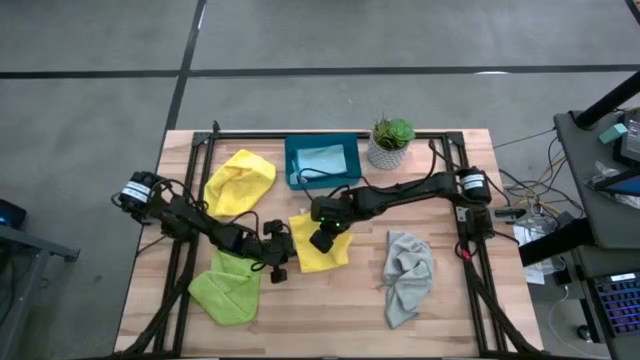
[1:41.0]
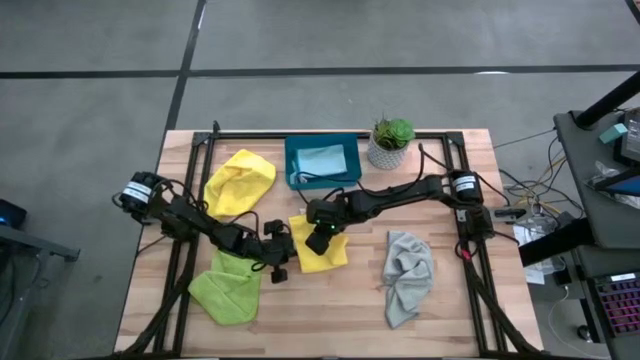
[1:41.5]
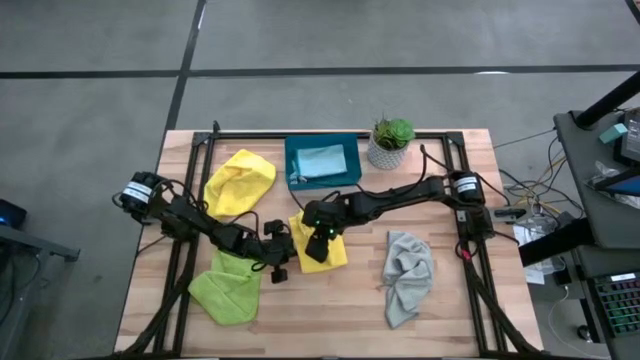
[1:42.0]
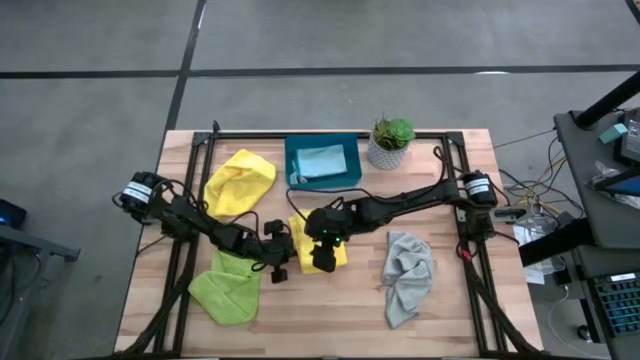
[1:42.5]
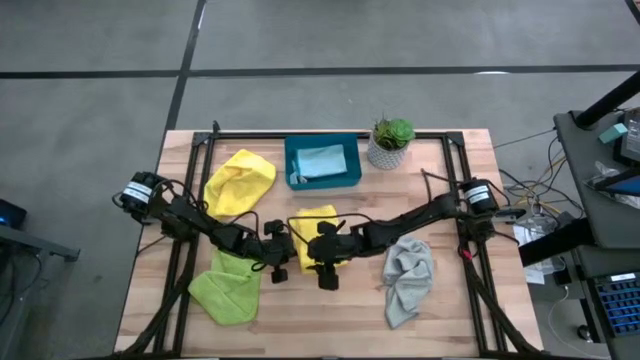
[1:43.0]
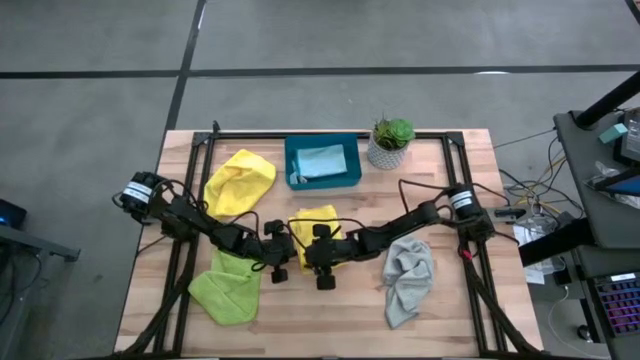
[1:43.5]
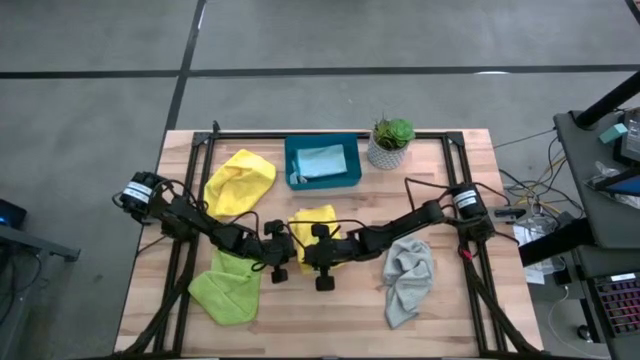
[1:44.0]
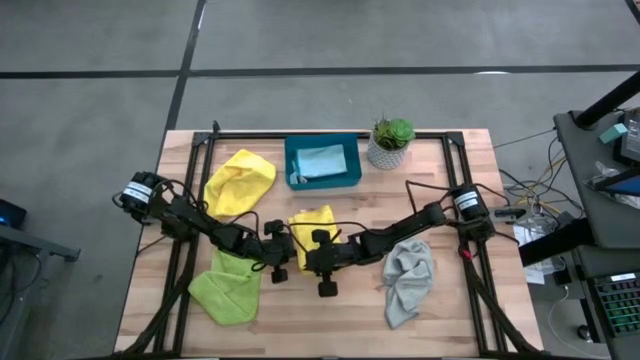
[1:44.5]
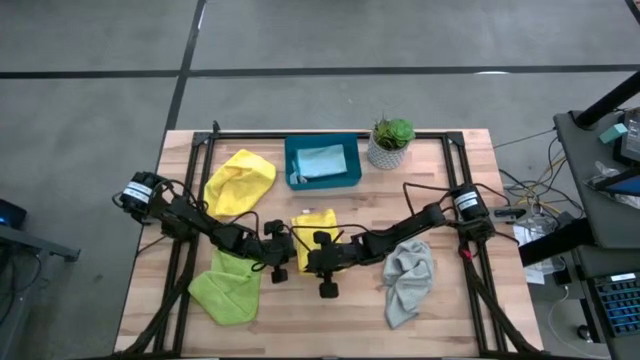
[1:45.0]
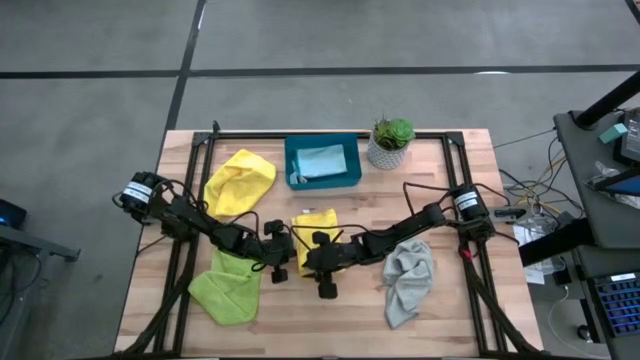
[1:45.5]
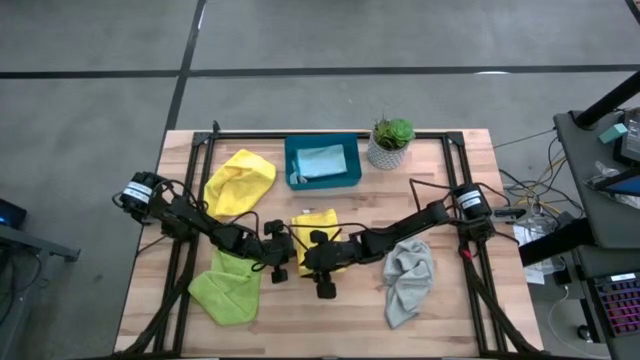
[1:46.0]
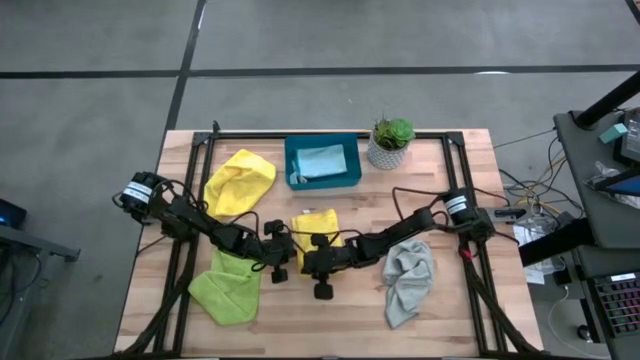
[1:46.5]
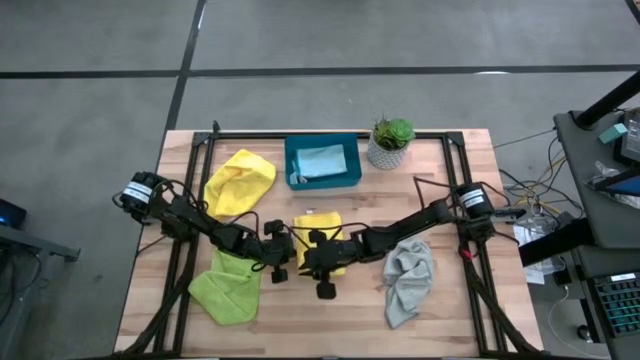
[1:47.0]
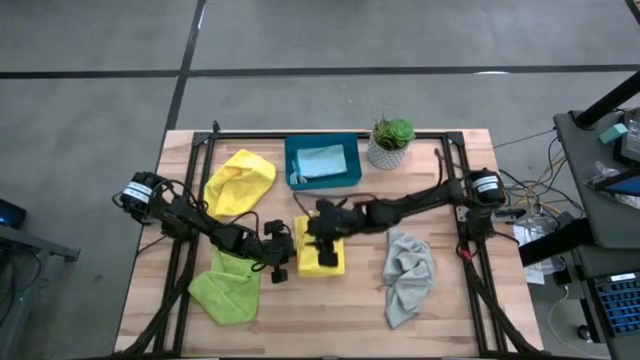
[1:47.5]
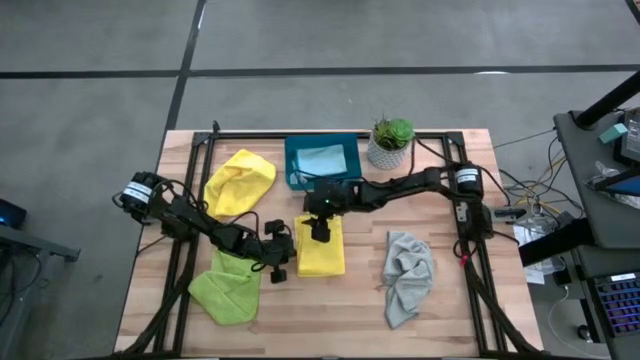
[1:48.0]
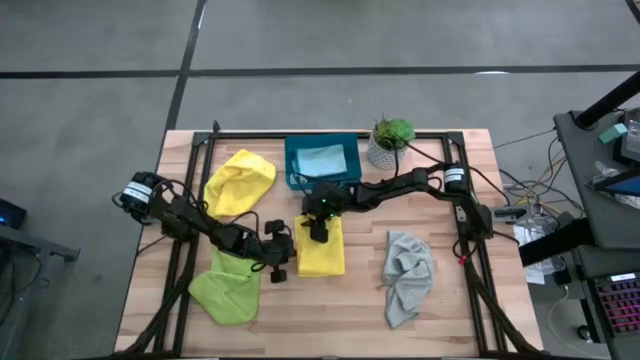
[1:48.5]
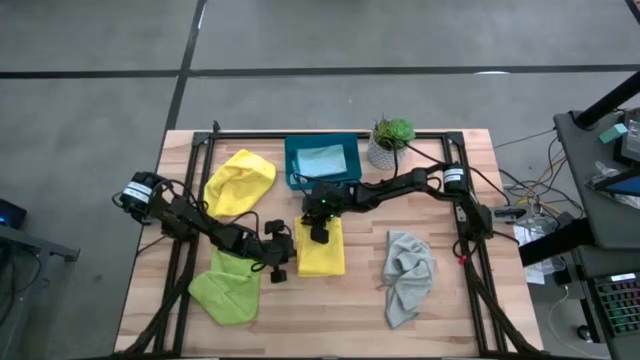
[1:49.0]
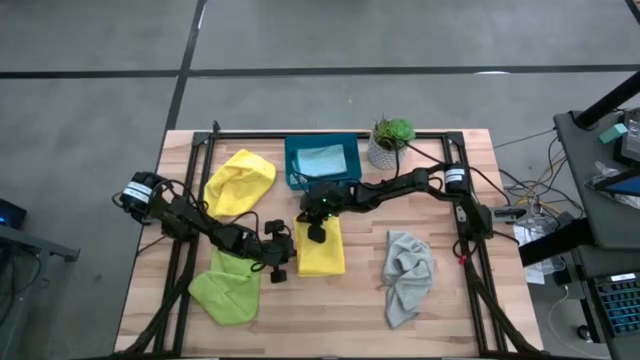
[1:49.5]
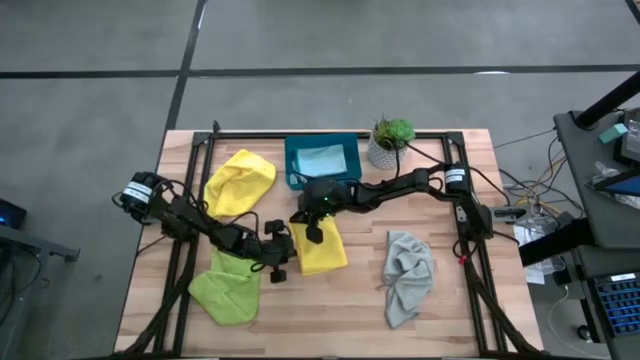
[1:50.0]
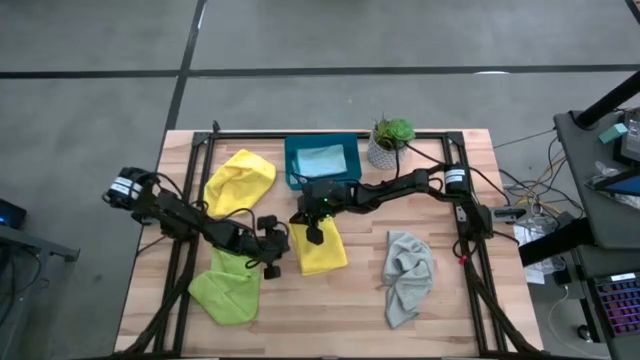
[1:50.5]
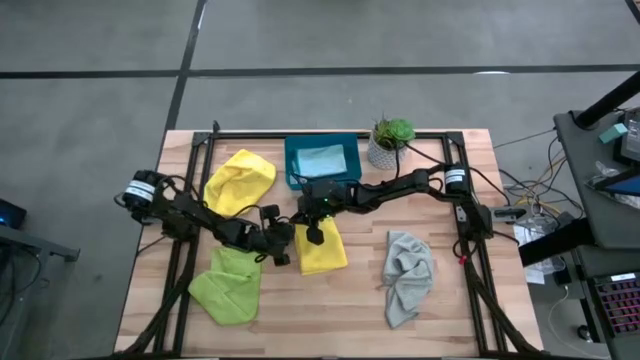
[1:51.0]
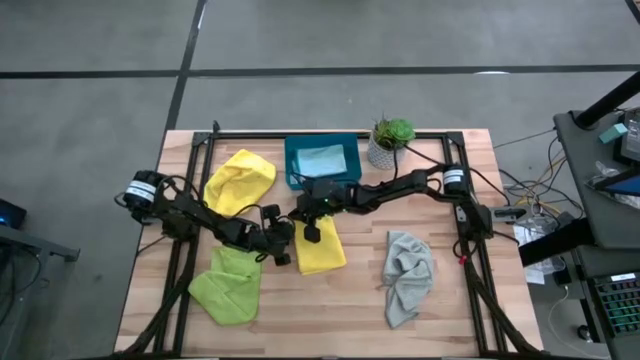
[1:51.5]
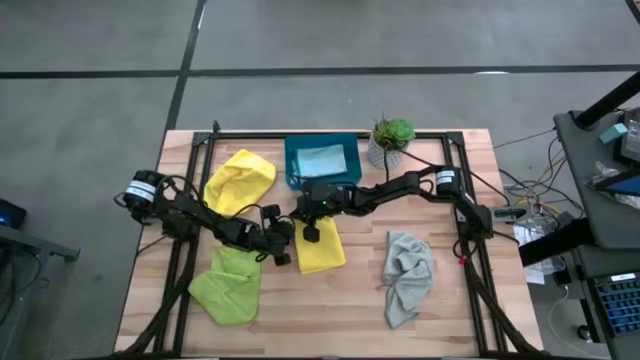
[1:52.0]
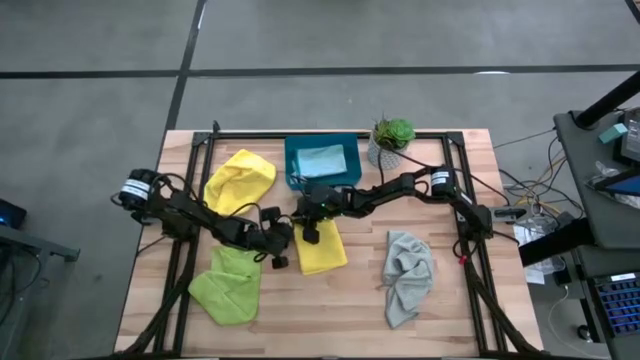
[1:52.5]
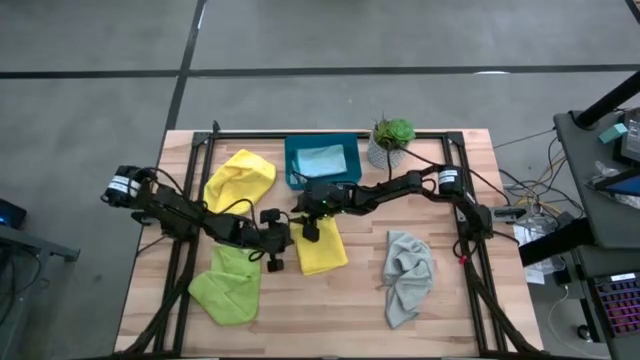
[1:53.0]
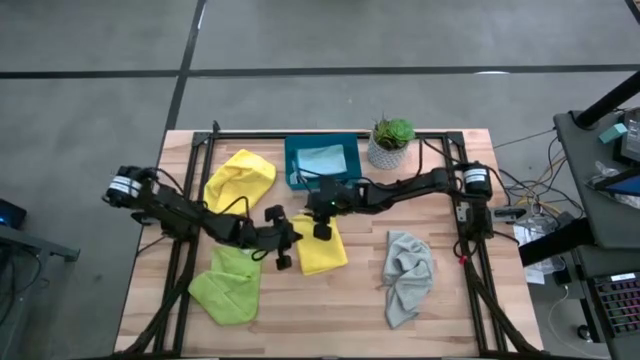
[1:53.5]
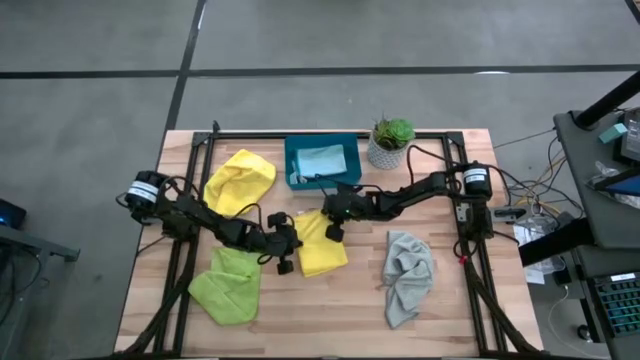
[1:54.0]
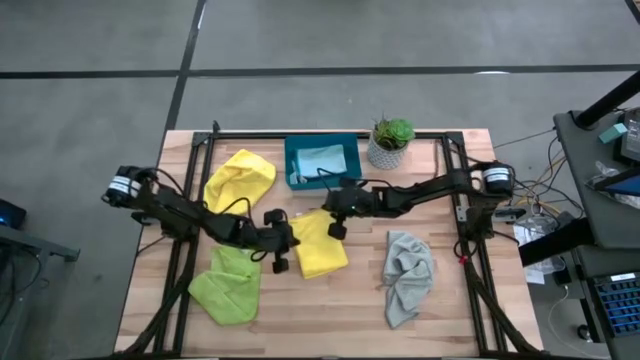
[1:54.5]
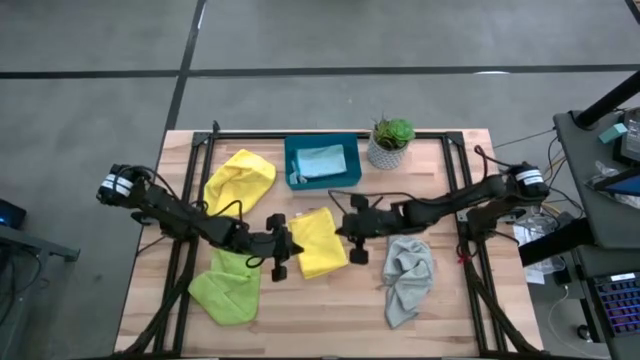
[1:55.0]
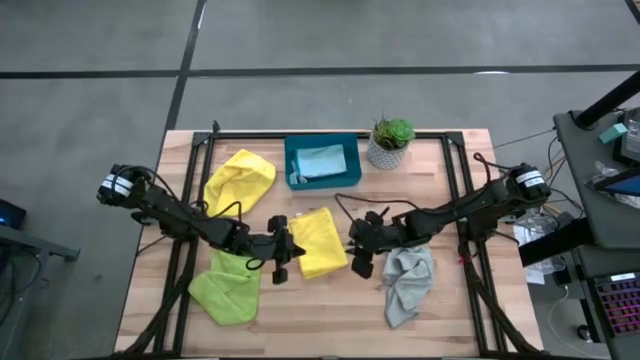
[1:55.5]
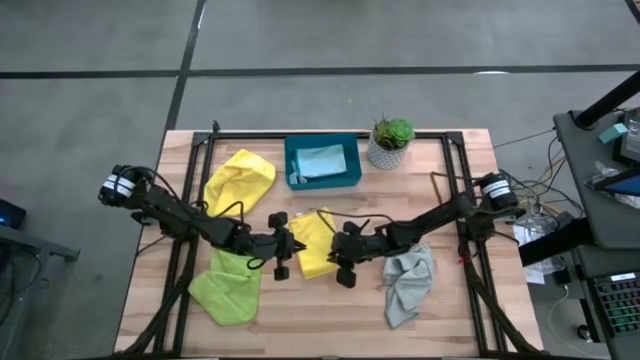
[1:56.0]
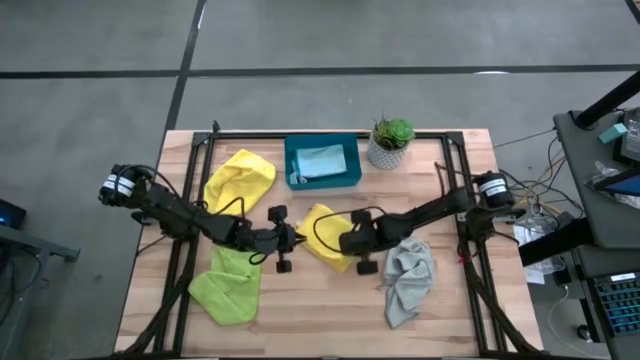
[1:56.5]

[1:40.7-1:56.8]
Task: Fold microfiber towels
Fold the right yellow microfiber cloth

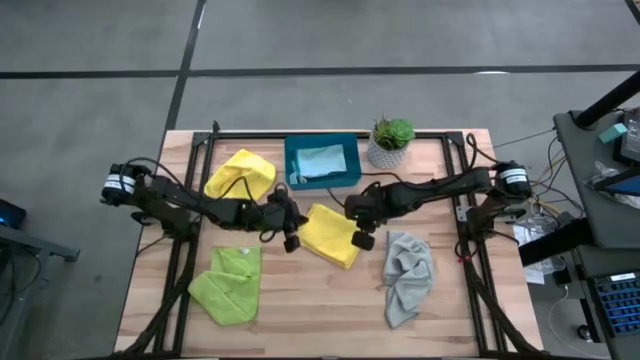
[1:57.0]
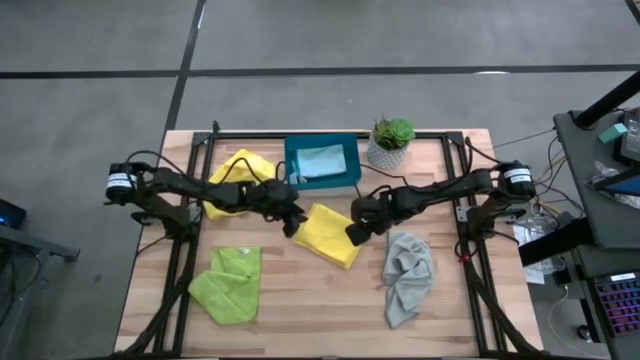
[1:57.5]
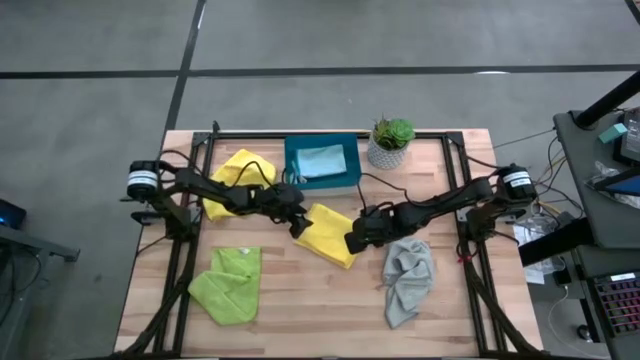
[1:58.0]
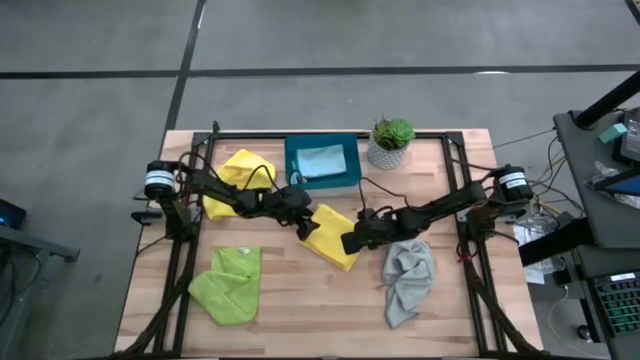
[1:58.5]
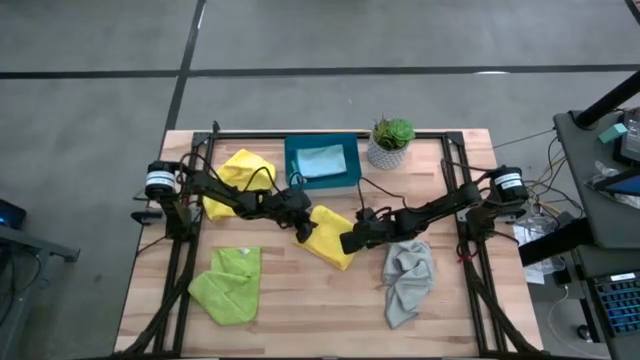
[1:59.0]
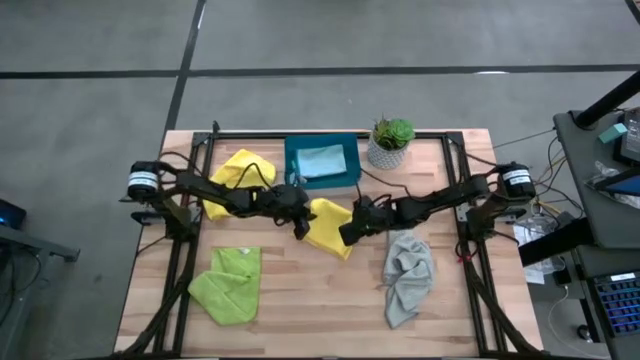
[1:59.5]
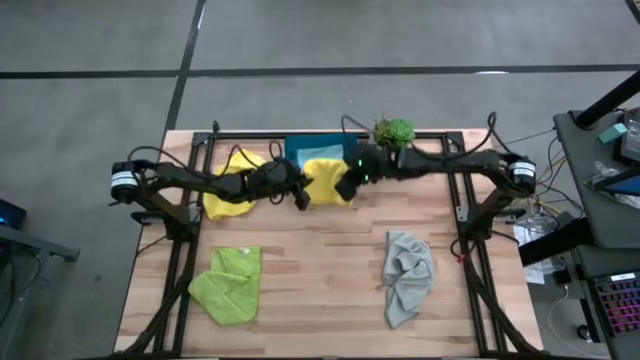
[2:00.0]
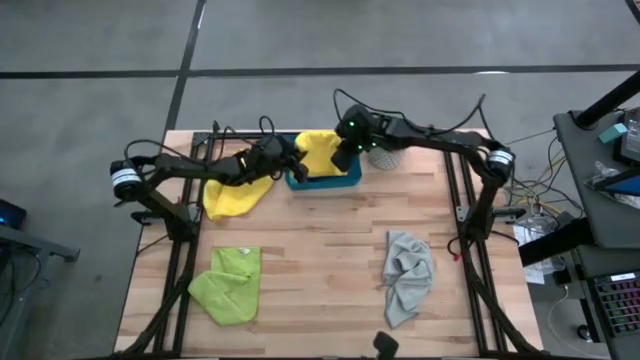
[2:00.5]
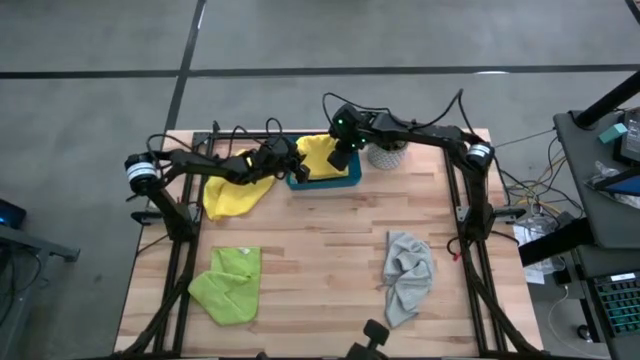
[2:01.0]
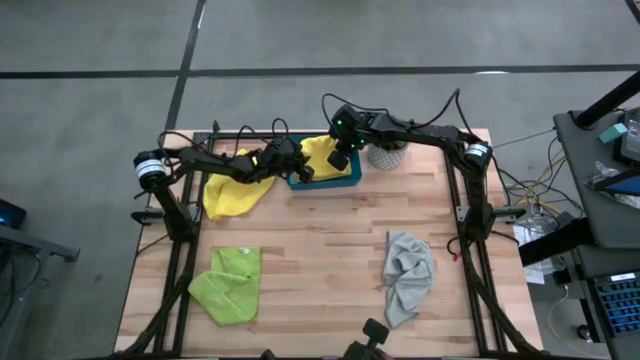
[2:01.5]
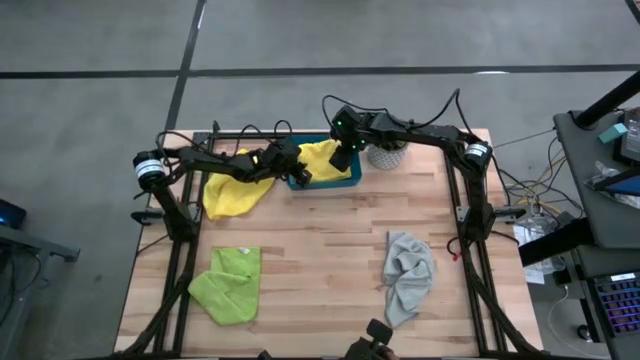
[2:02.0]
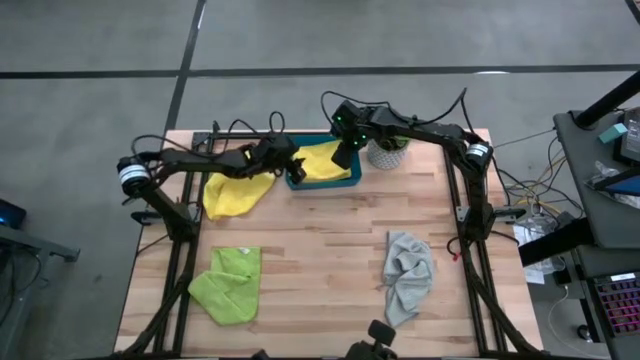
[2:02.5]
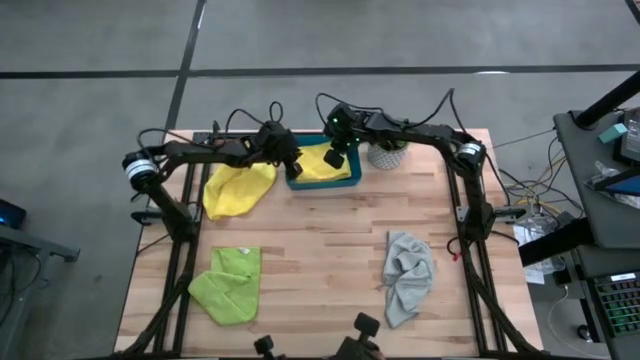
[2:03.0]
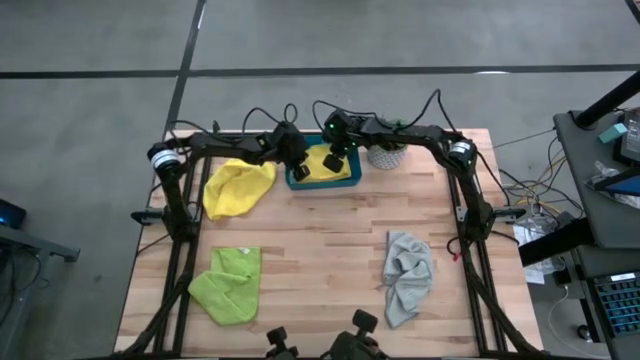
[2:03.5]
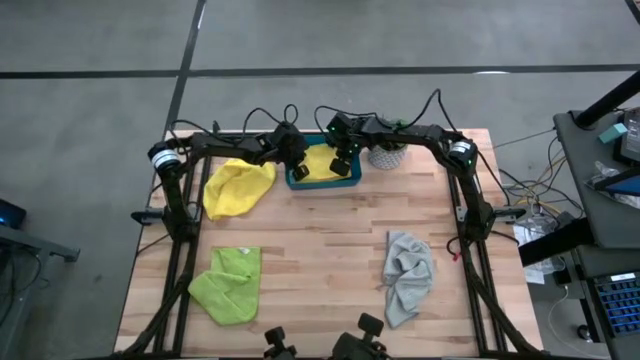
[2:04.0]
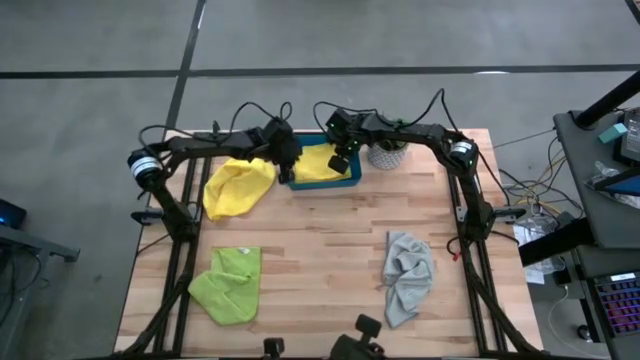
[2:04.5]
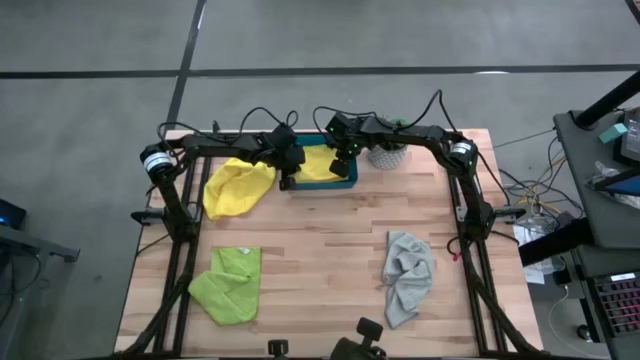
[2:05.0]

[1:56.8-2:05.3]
Stack the folded right yellow microfiber cloth on top of the blue microfiber cloth
